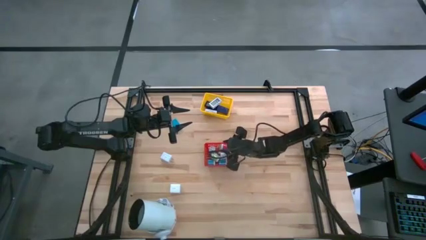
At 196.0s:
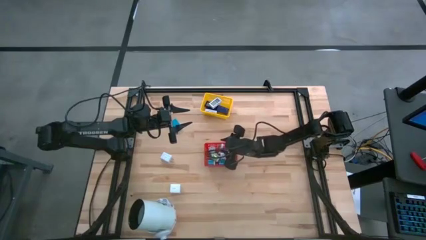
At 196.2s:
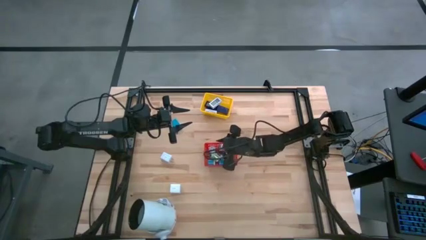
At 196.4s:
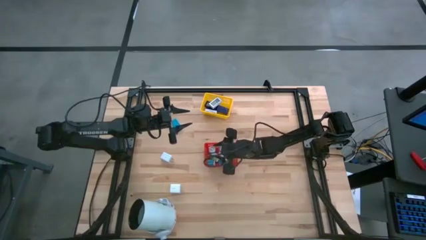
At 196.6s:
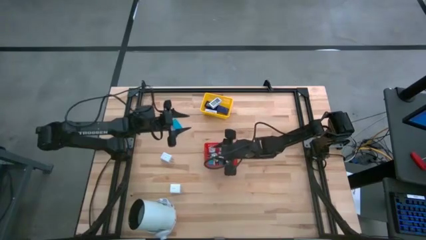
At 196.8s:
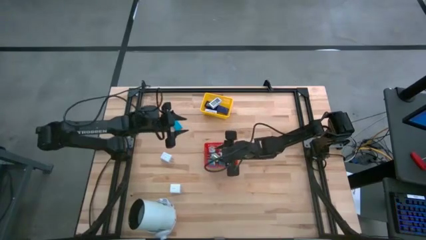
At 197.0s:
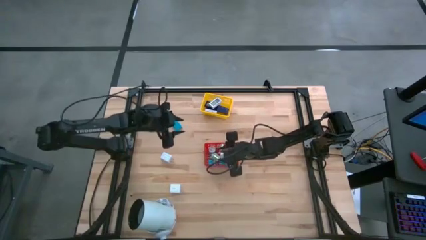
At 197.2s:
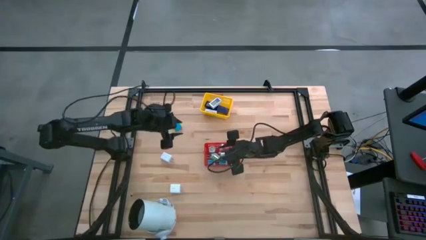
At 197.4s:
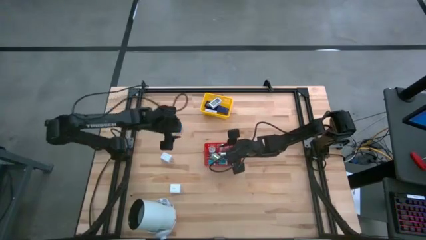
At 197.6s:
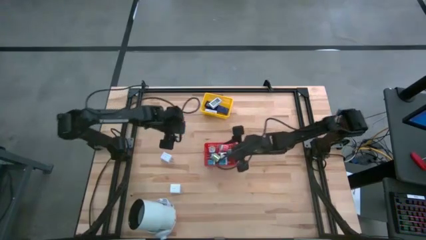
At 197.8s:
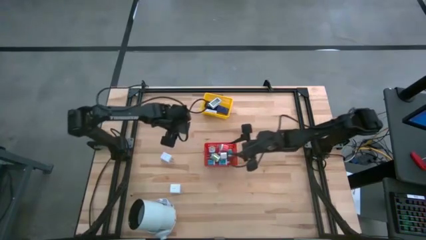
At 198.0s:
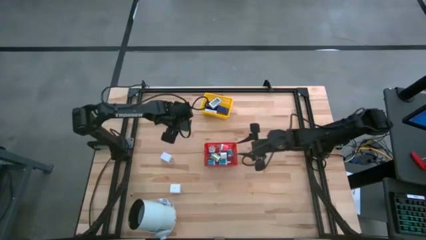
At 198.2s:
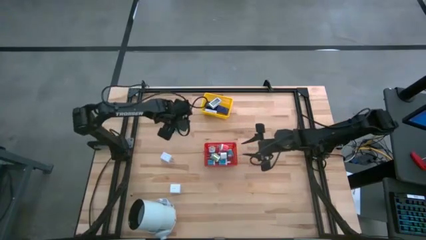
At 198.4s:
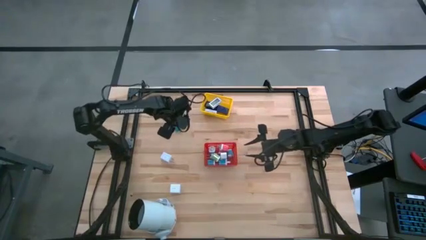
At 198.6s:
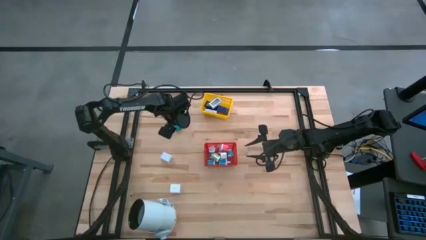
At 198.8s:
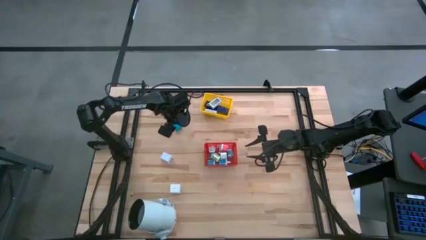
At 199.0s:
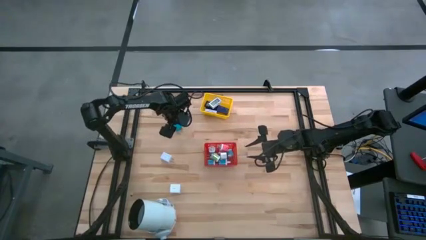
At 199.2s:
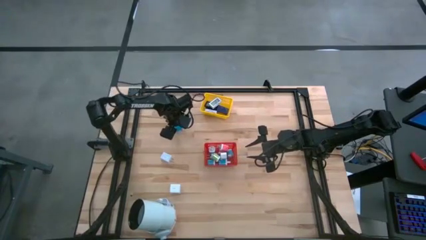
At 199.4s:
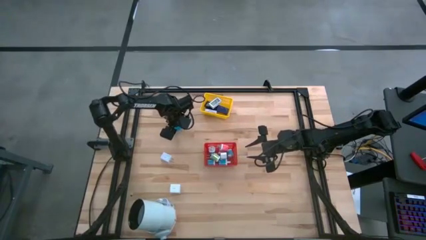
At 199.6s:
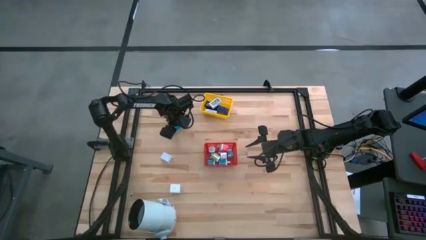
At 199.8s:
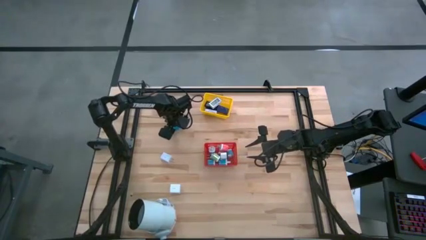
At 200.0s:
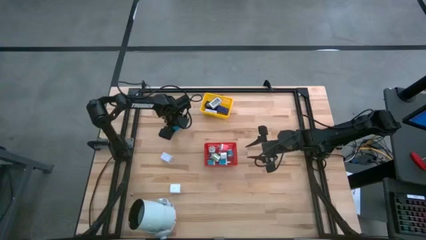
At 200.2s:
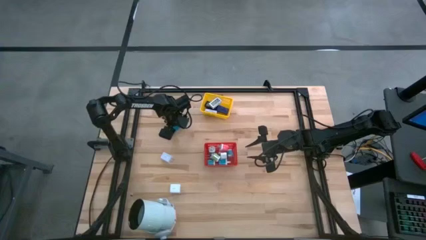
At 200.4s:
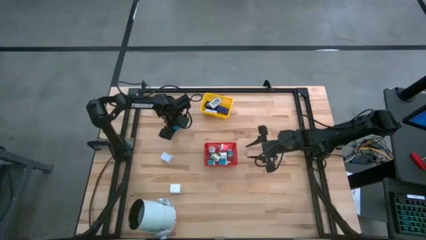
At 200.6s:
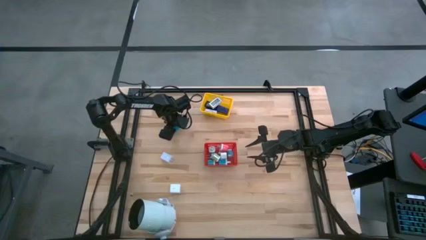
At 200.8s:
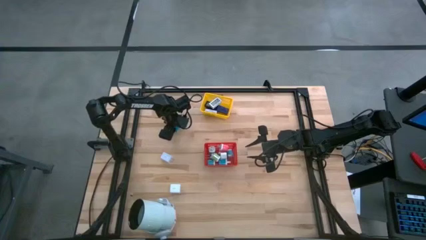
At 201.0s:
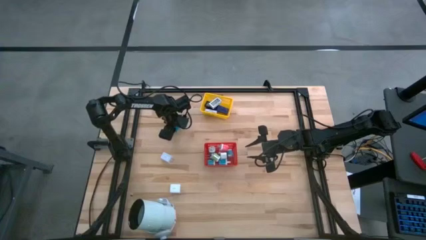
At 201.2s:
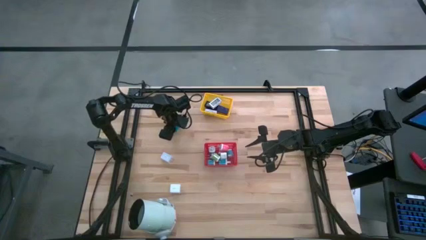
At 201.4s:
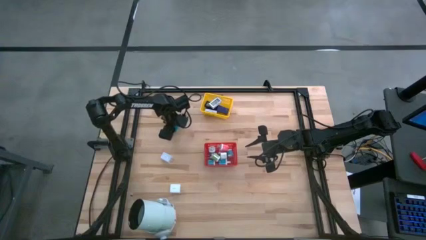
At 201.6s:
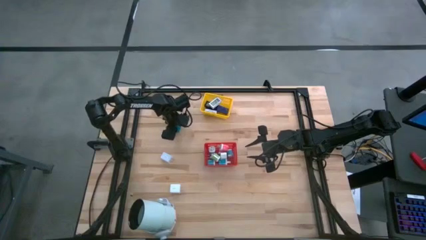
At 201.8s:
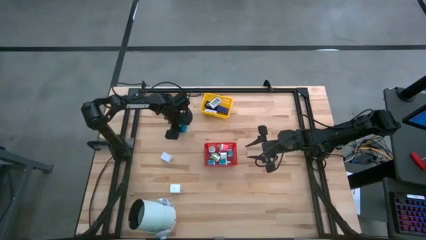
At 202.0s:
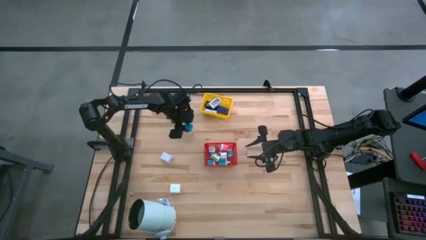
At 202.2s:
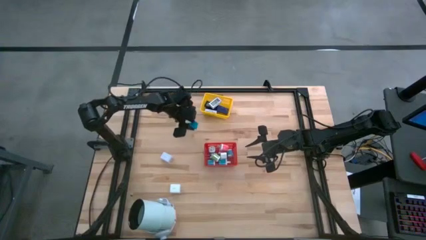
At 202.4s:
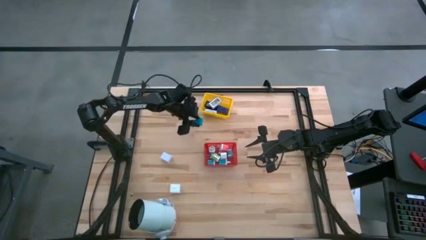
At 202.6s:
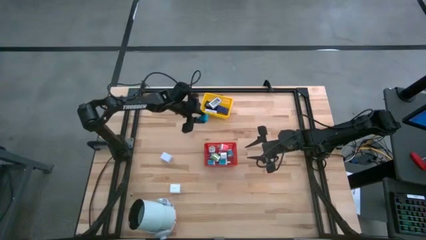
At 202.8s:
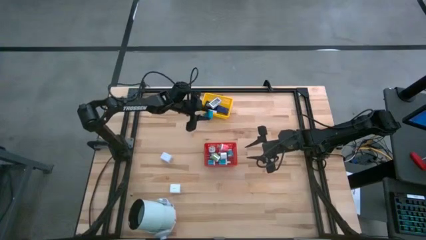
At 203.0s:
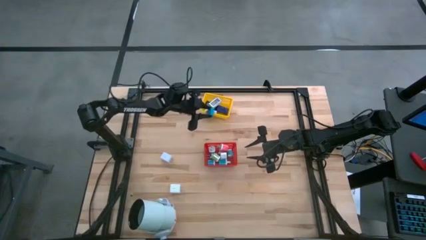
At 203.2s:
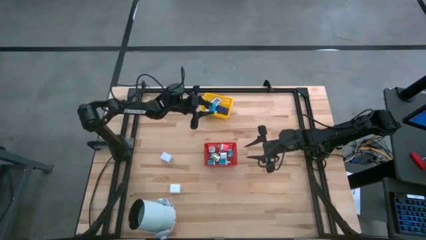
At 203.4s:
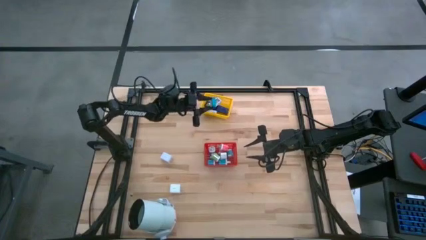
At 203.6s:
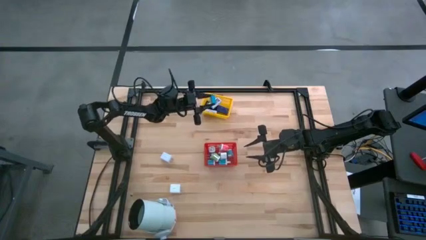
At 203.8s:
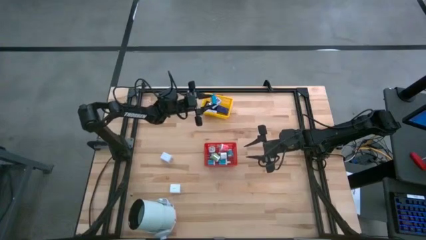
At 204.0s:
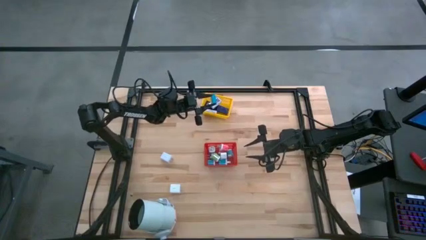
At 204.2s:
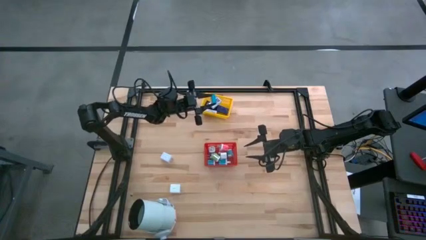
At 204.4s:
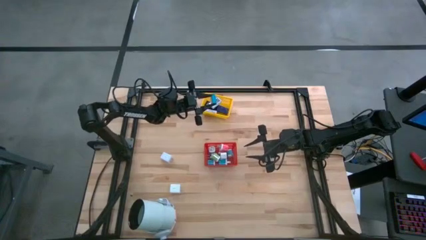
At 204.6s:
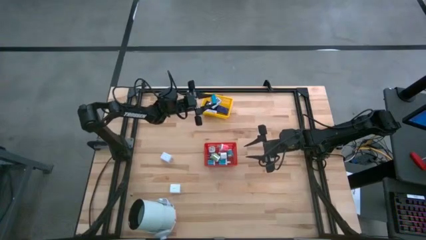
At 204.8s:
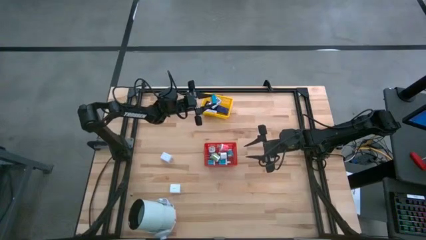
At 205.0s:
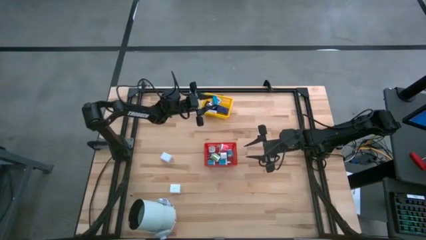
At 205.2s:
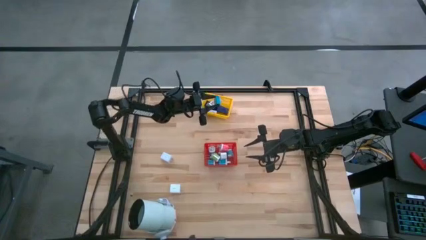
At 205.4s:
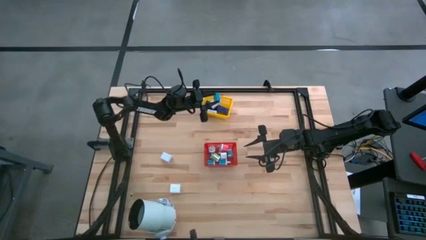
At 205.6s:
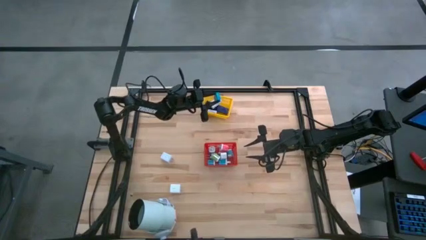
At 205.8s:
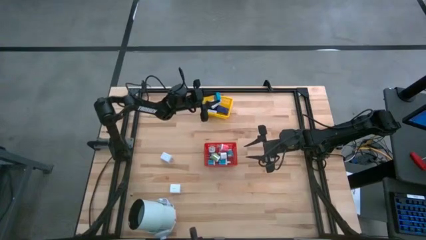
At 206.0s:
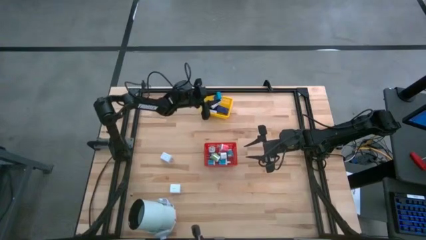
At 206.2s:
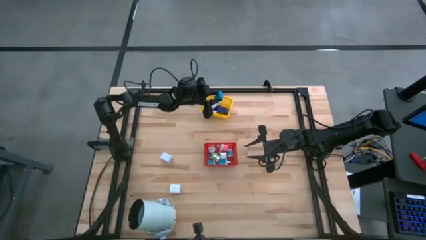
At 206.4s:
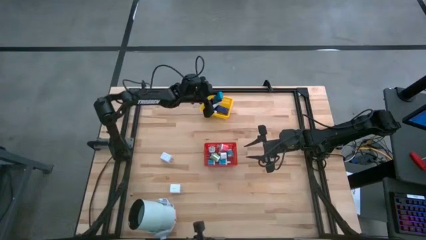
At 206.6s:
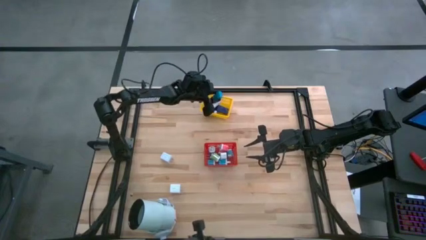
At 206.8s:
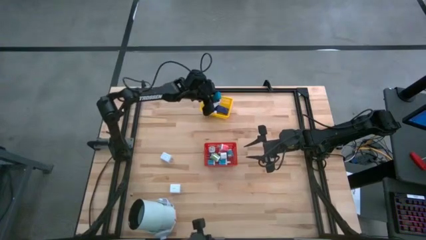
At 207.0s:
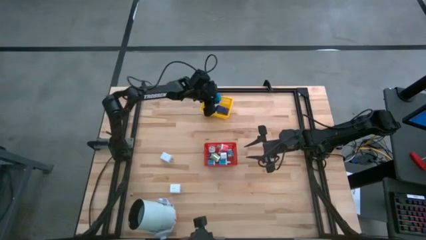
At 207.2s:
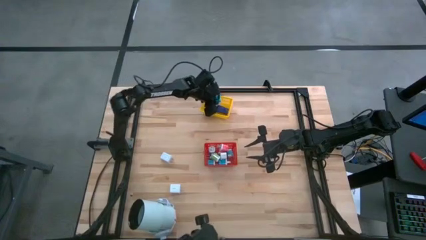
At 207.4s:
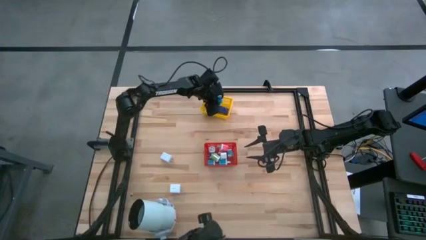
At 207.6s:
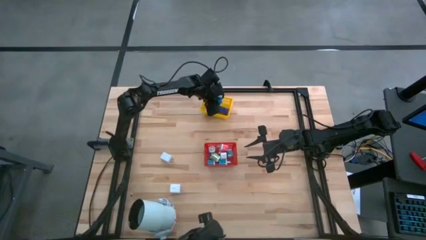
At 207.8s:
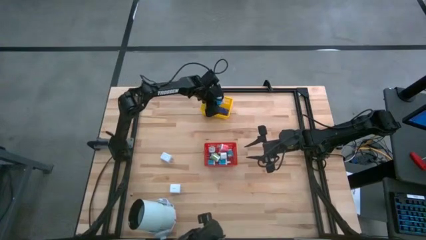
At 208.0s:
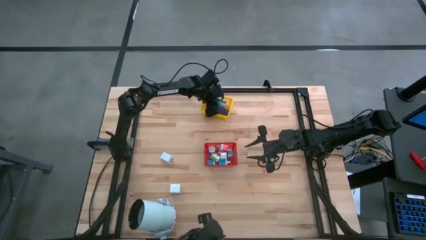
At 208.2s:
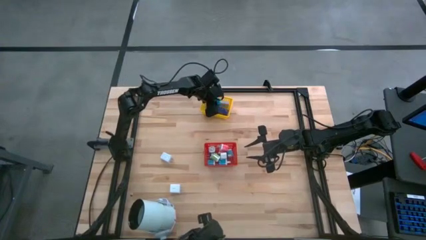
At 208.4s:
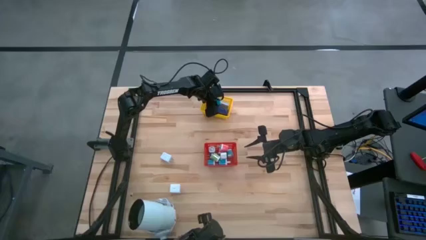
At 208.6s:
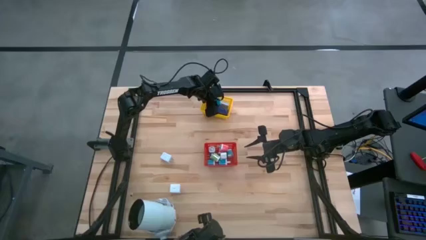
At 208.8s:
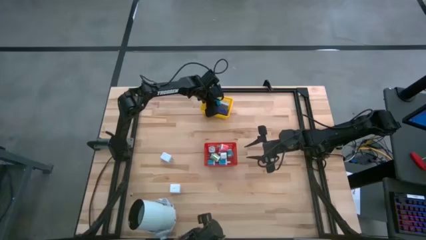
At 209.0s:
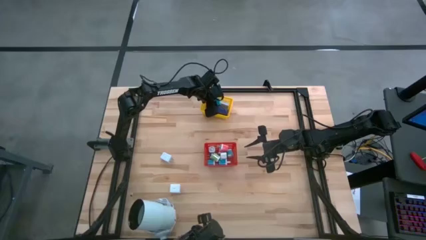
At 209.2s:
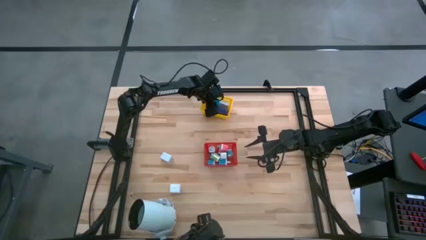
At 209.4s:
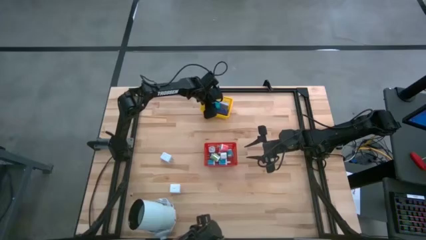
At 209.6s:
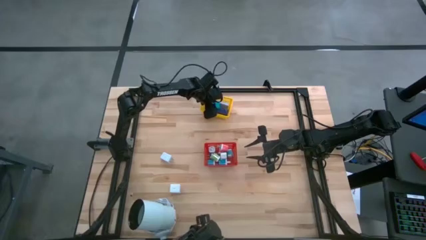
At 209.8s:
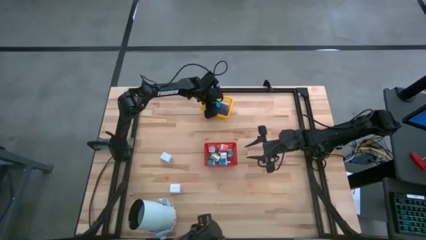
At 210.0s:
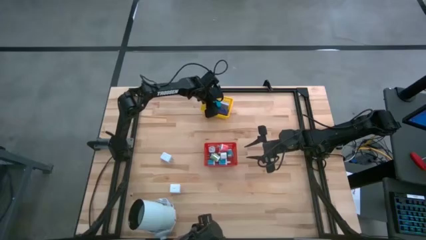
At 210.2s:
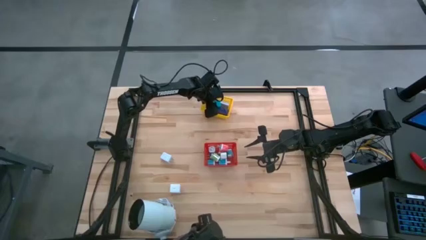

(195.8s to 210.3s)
Task: Pick & Place Office items
Put the blue digital clock into the yellow bin

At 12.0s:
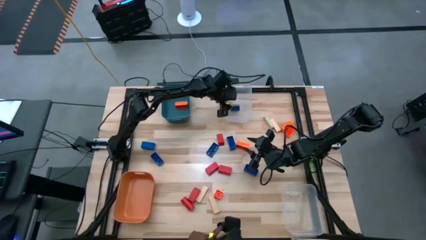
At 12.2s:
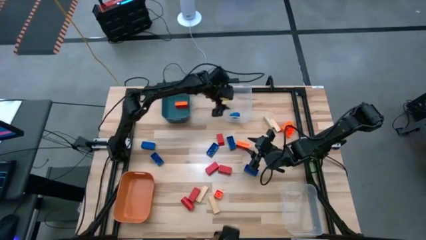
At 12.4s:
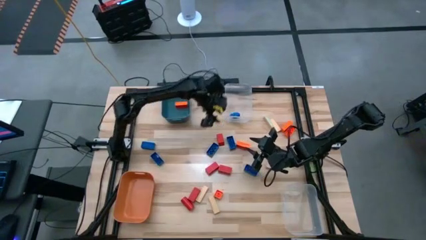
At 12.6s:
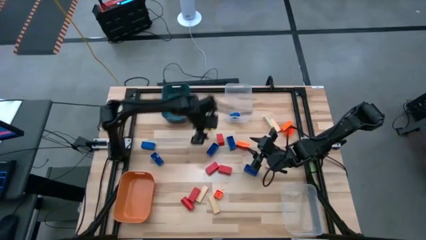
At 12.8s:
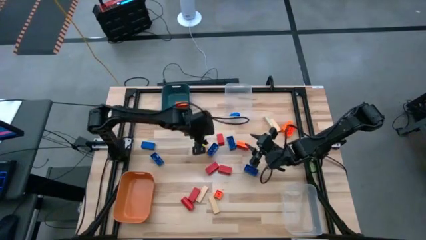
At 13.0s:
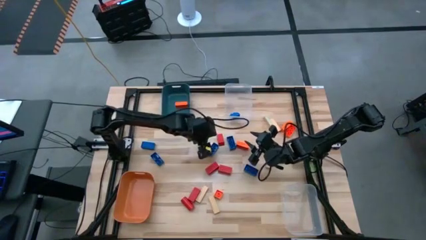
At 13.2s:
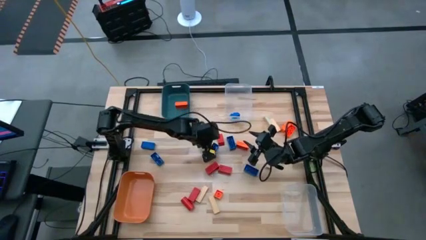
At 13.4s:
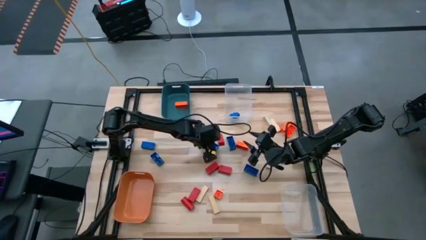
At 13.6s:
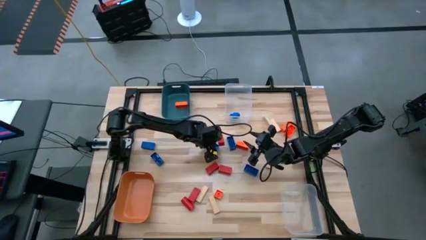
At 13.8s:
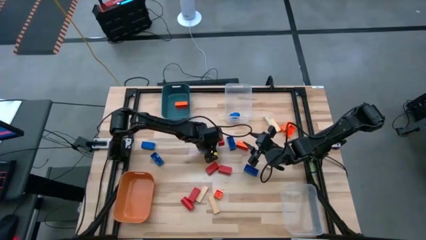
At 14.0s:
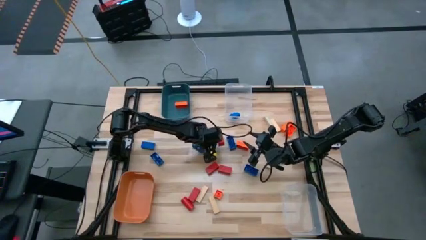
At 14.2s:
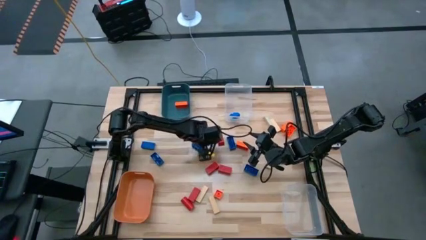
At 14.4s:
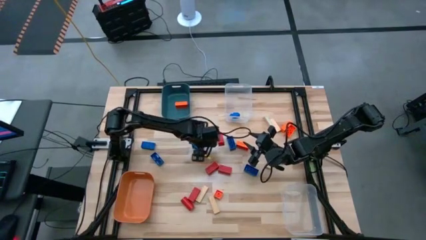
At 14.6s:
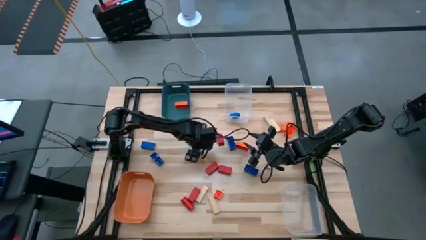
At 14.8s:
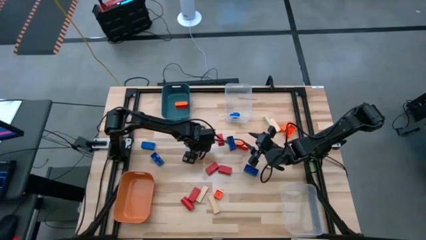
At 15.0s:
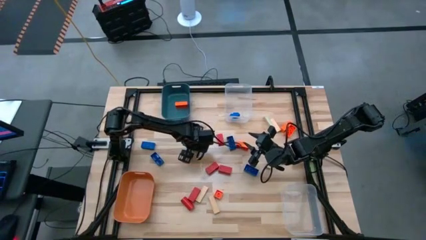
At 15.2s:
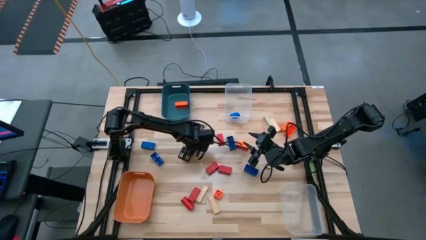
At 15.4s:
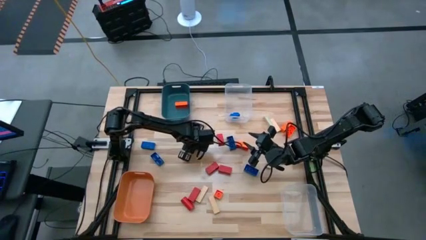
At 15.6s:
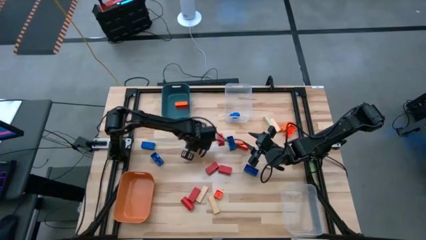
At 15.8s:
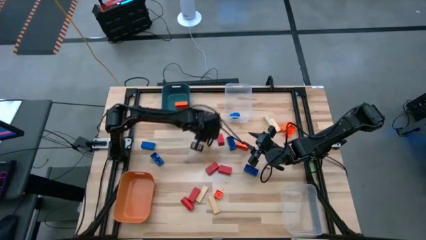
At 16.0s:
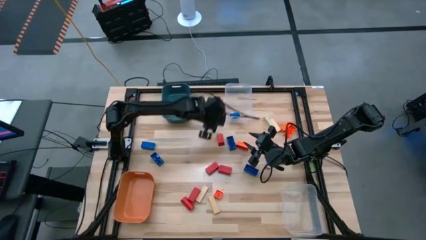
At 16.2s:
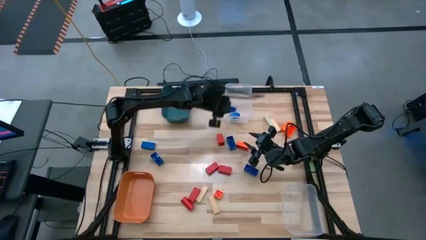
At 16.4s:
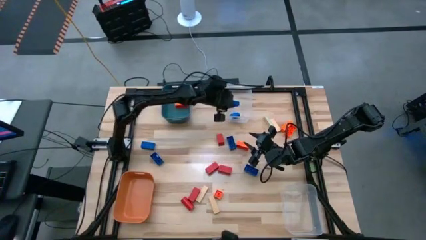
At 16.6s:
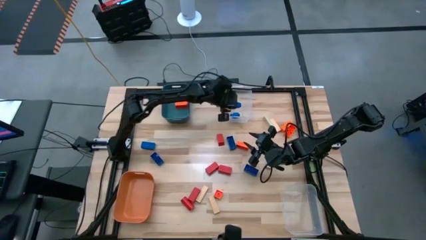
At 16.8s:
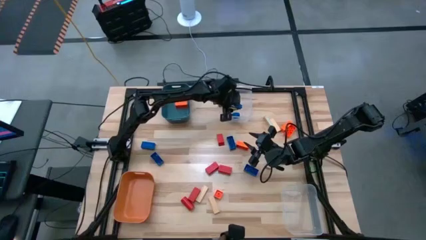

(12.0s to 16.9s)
Task: Sort blocks
Put the blue game piece into the top transparent bin
